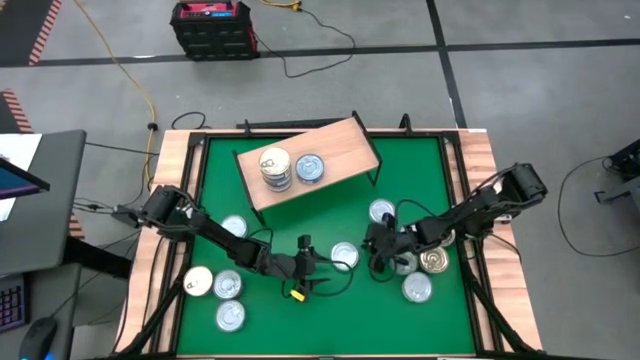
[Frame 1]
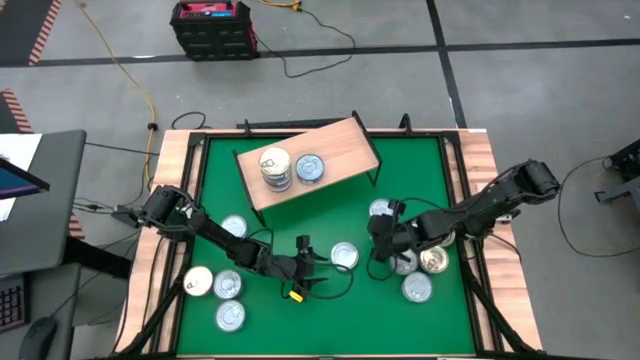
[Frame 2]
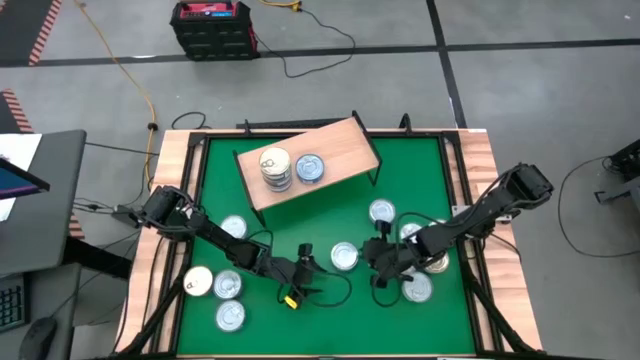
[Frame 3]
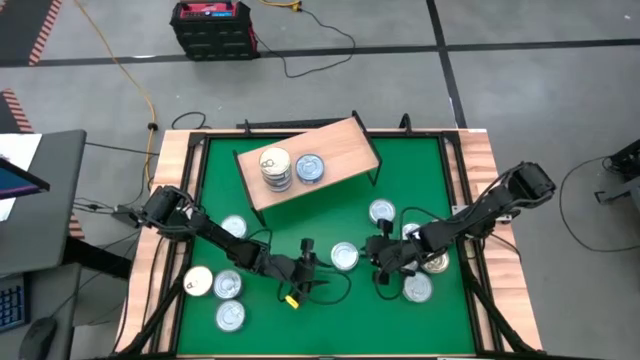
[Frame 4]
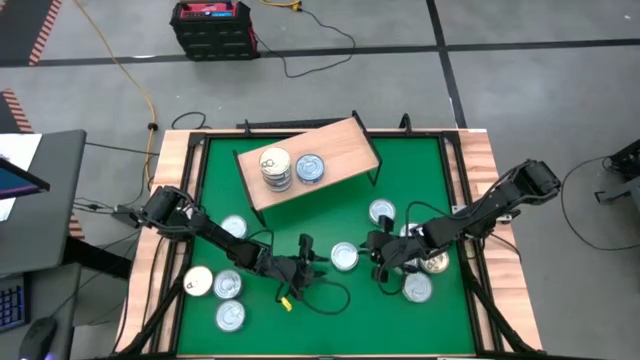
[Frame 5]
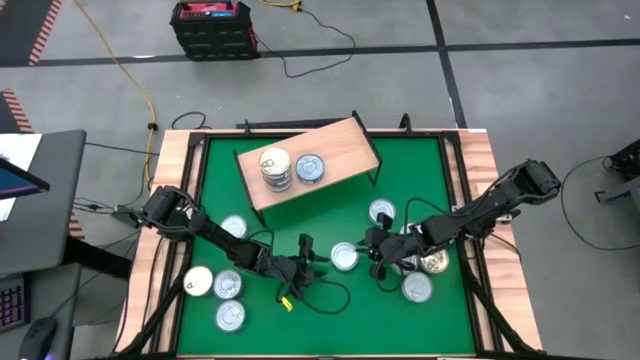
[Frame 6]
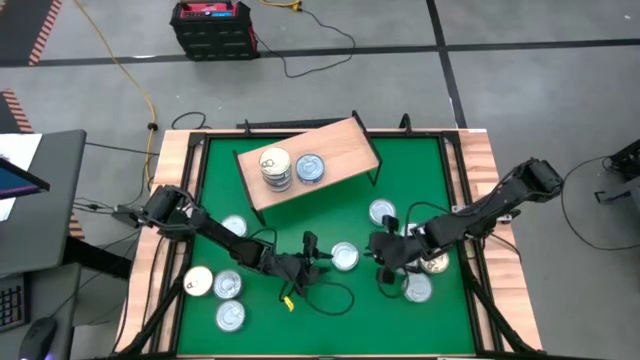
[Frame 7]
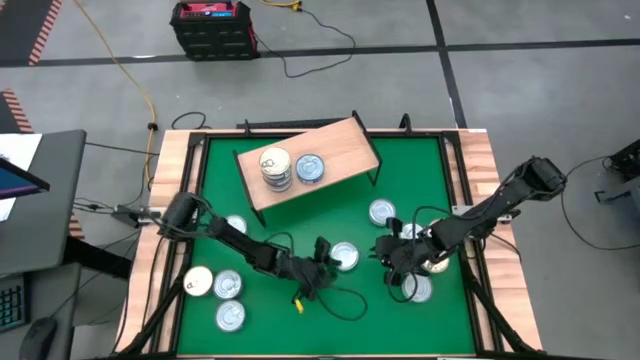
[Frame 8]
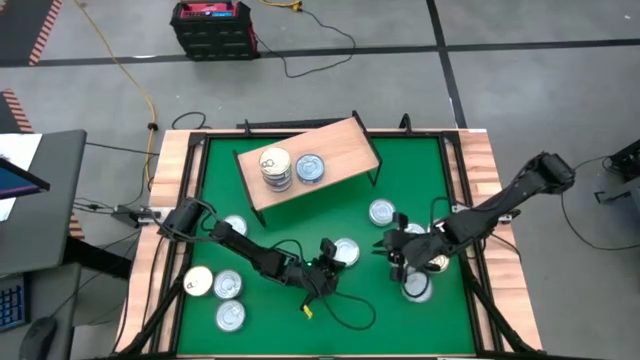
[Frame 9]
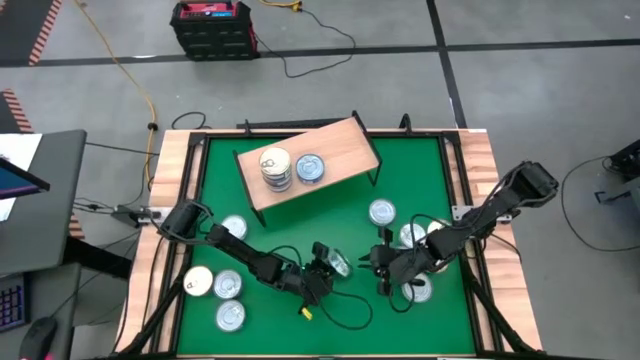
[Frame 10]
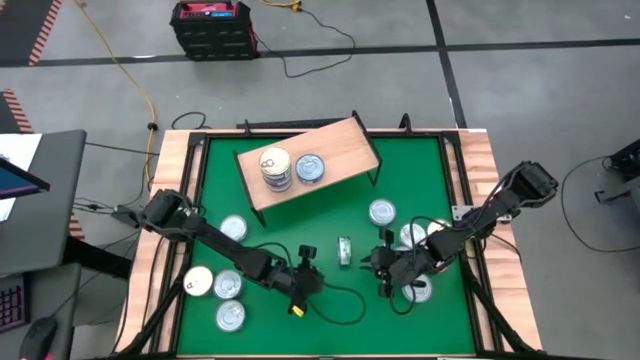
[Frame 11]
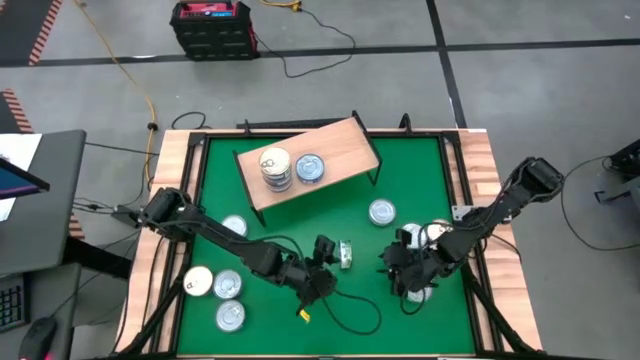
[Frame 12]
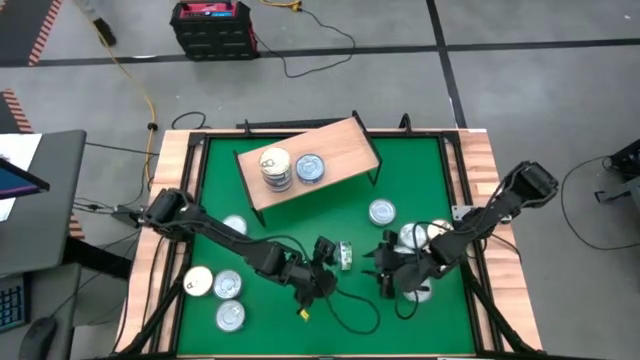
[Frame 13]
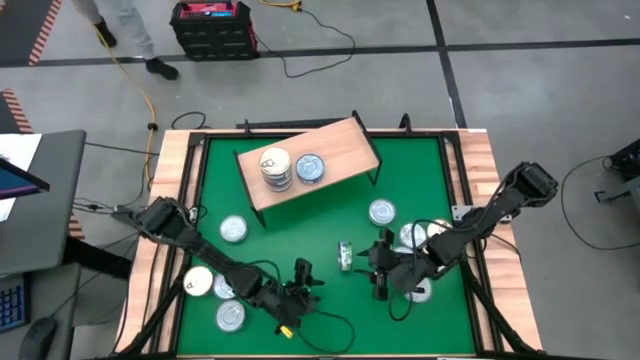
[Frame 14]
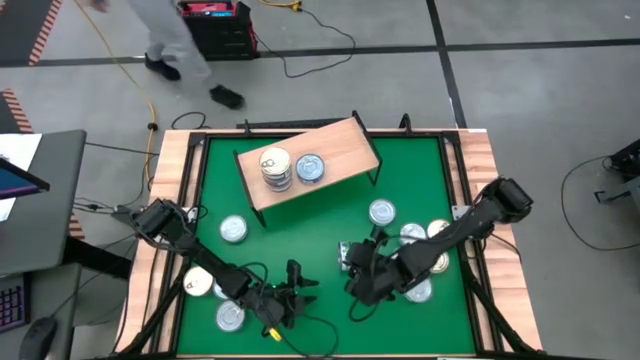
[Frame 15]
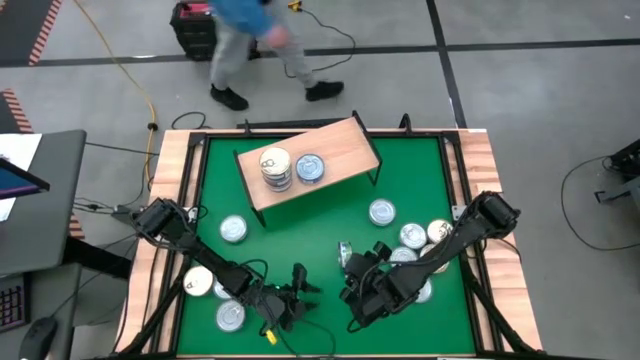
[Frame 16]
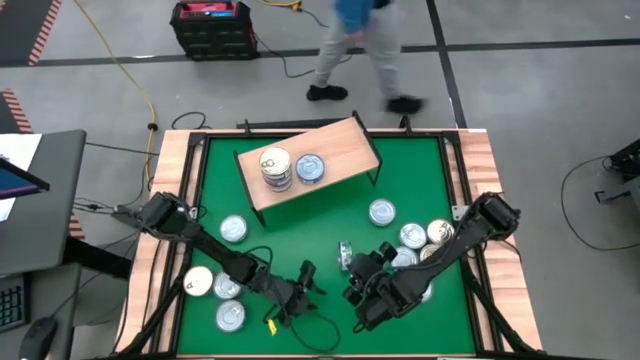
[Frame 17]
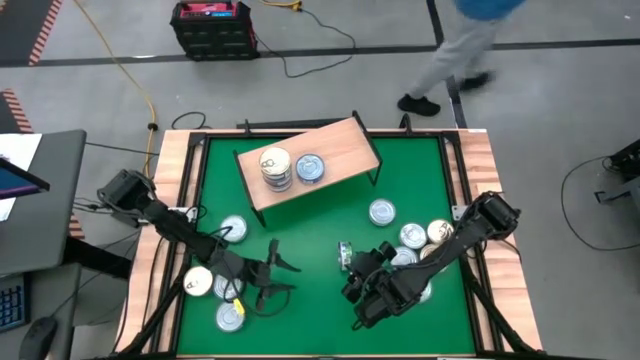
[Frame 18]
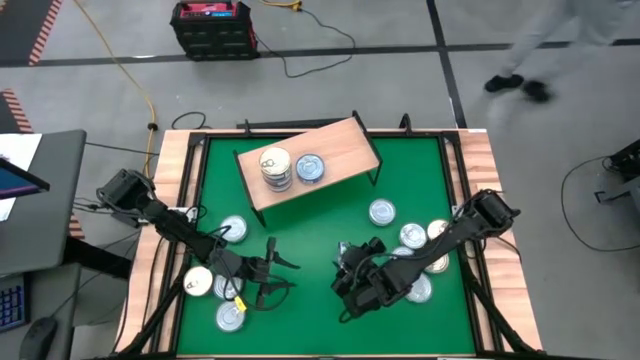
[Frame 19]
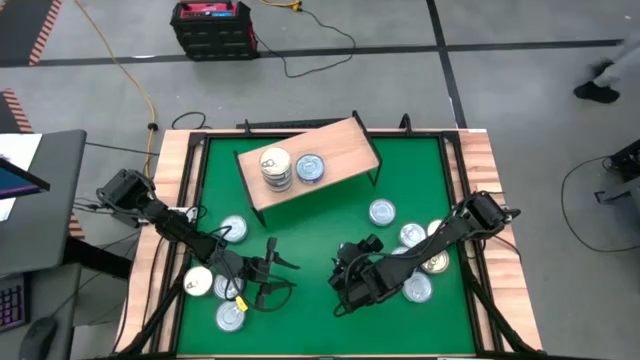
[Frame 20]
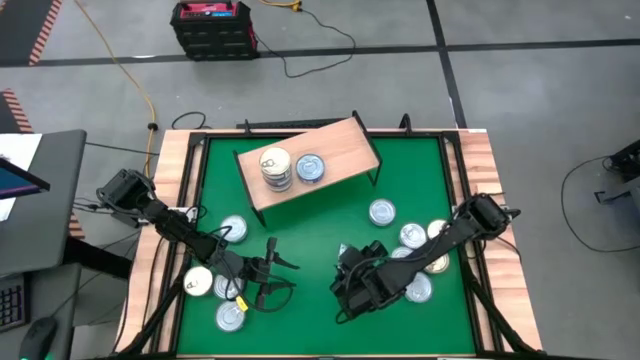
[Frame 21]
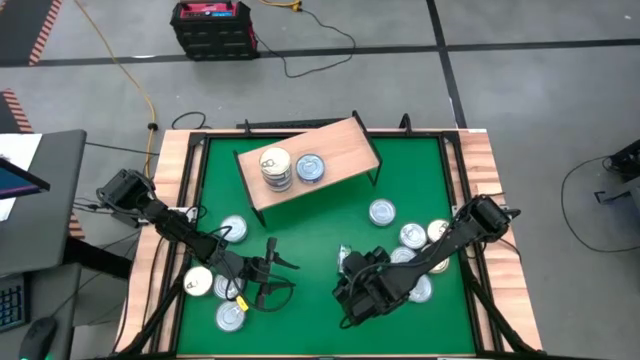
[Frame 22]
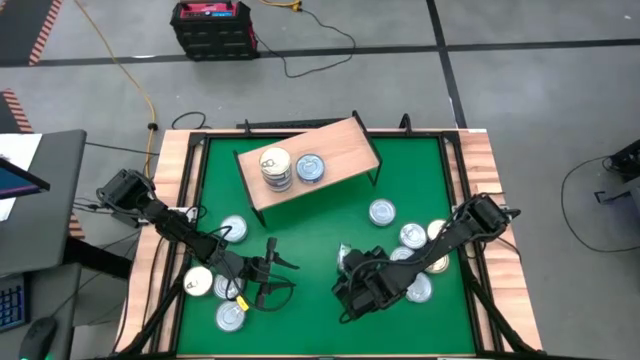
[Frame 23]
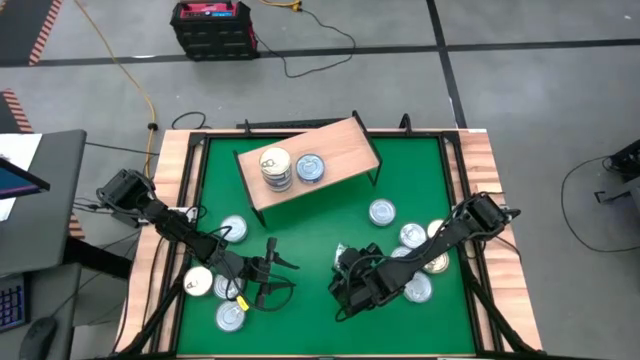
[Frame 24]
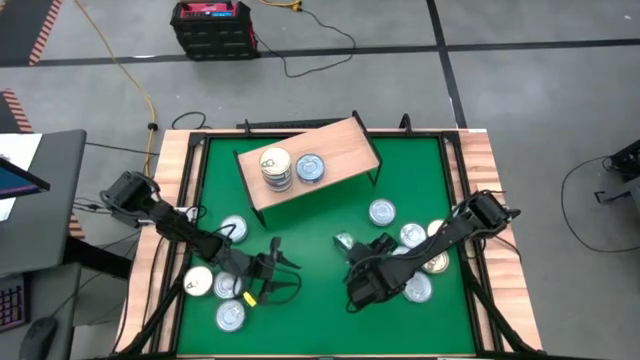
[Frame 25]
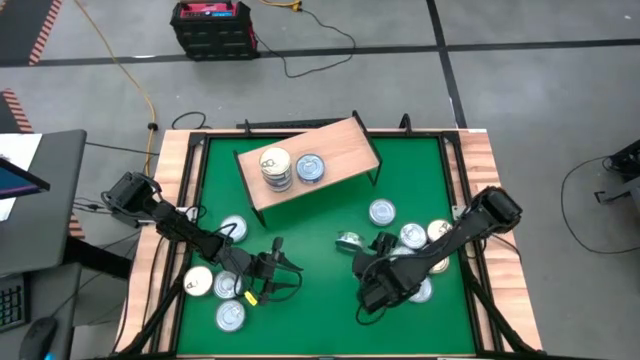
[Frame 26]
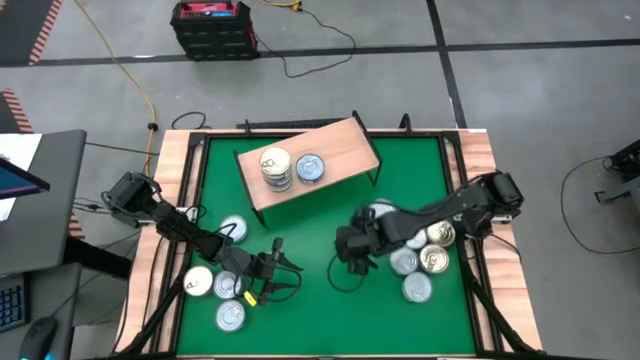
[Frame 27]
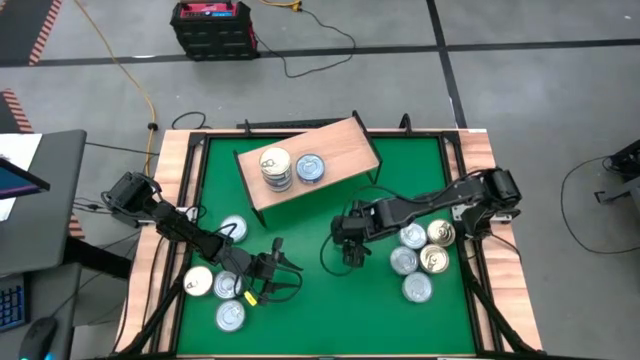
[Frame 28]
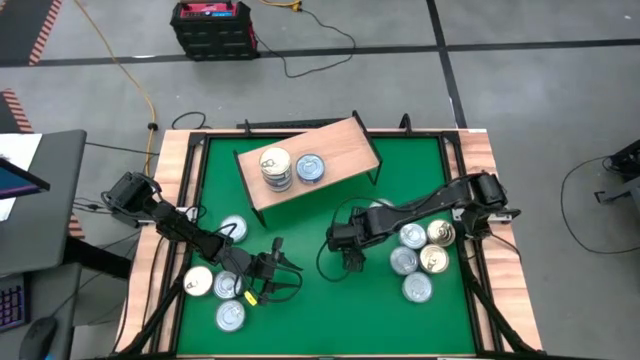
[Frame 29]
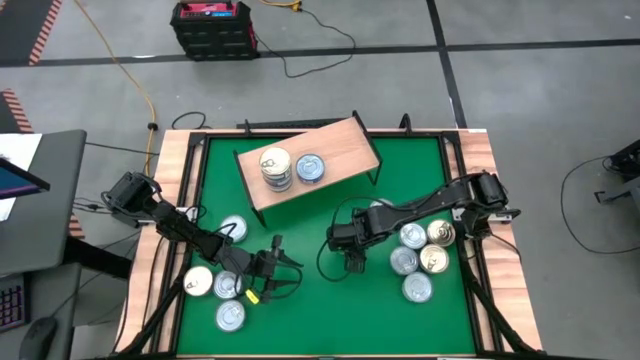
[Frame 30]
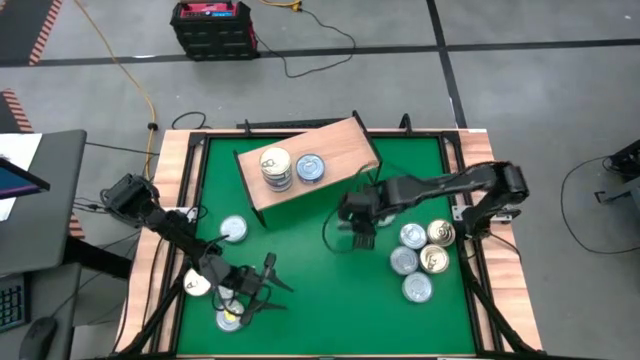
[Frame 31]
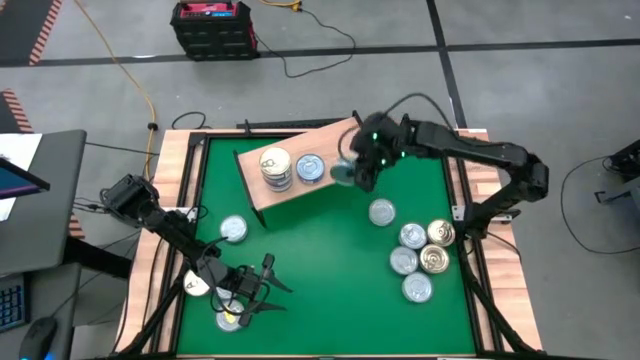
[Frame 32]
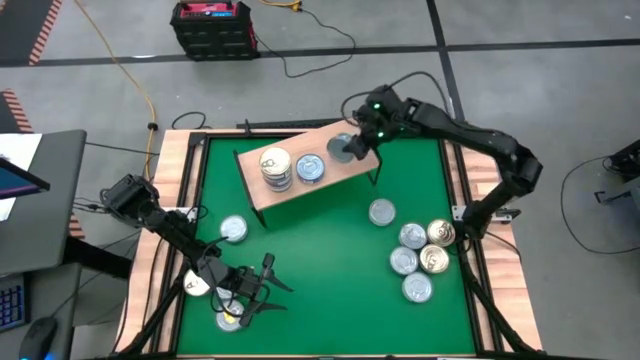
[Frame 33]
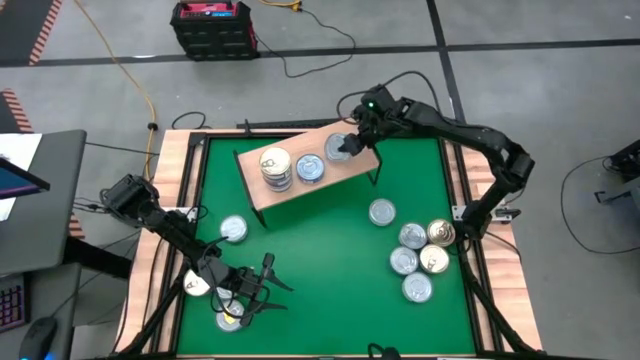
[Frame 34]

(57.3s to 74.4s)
Task: Stack canned seafood by type on shelf
Put the green white tuna can on the shelf
